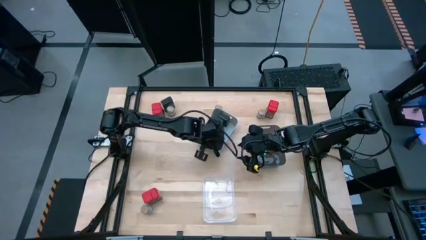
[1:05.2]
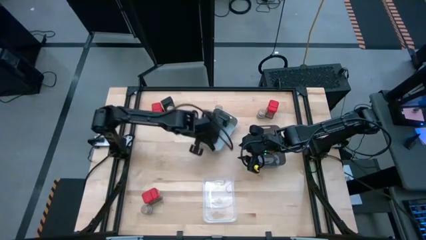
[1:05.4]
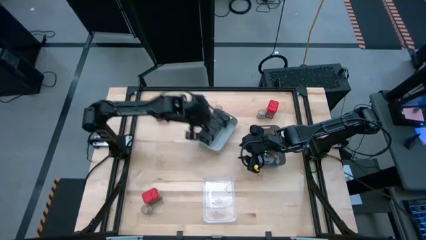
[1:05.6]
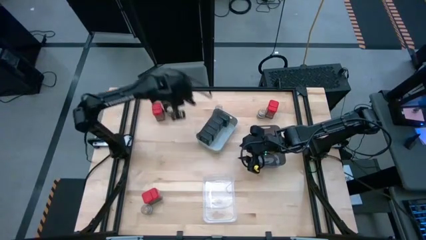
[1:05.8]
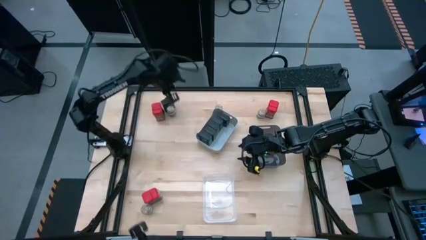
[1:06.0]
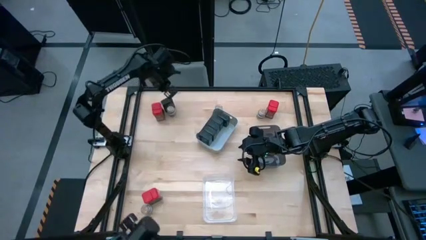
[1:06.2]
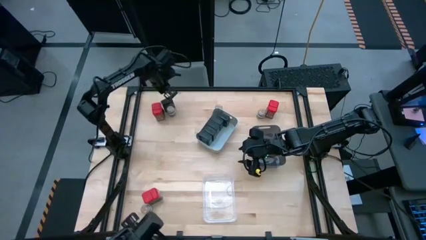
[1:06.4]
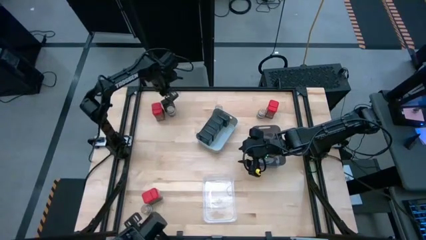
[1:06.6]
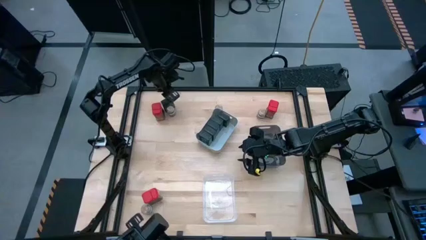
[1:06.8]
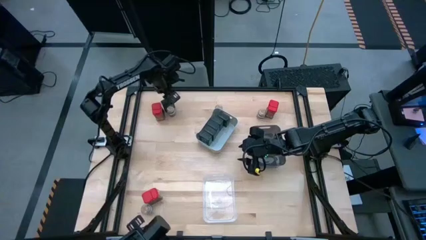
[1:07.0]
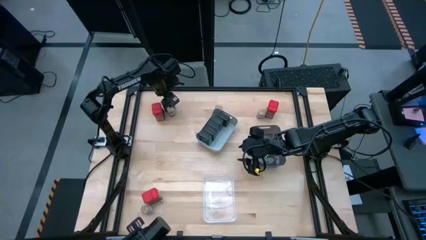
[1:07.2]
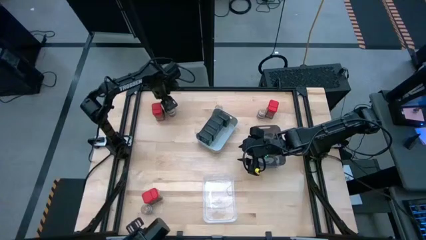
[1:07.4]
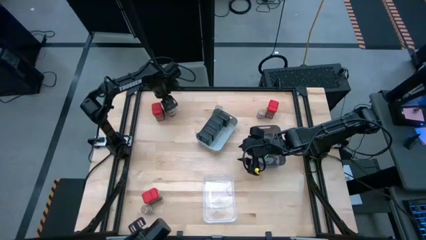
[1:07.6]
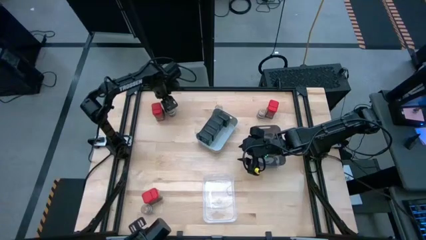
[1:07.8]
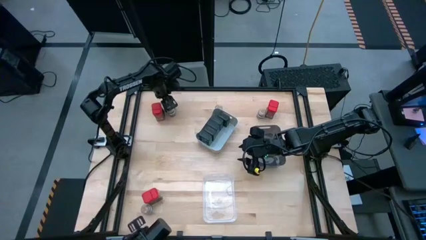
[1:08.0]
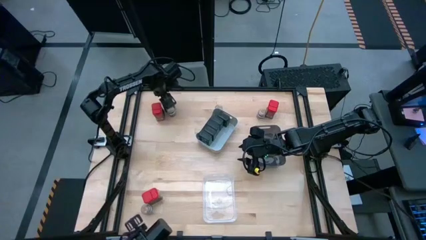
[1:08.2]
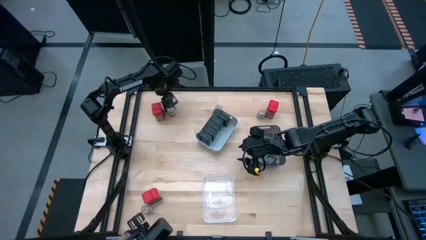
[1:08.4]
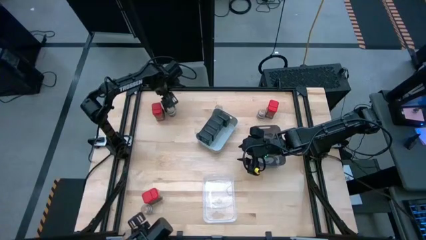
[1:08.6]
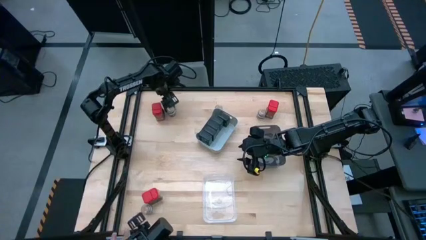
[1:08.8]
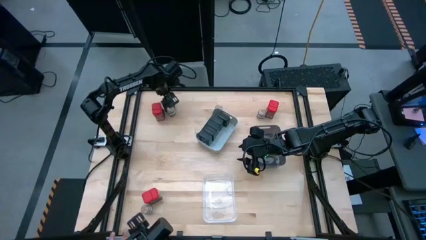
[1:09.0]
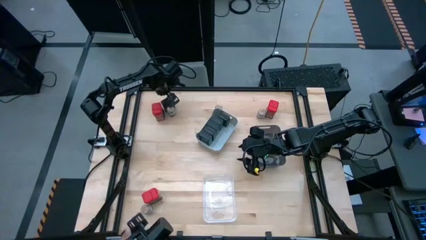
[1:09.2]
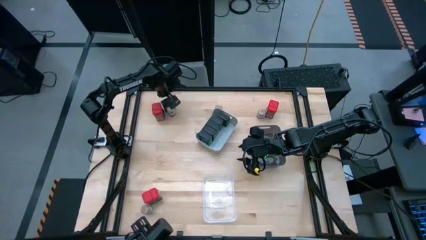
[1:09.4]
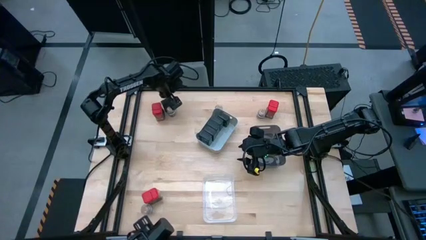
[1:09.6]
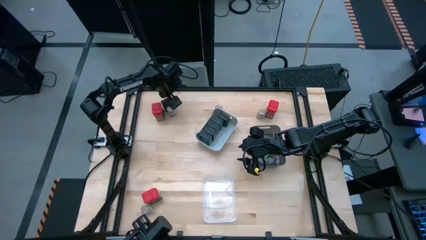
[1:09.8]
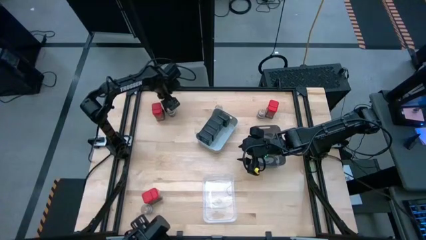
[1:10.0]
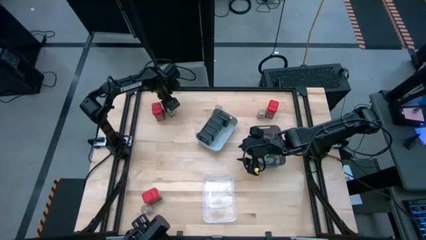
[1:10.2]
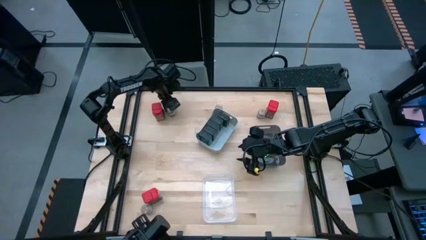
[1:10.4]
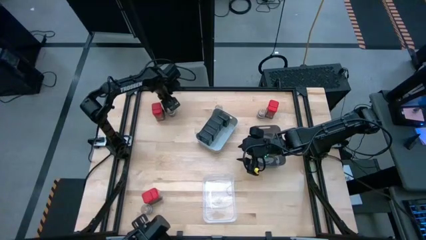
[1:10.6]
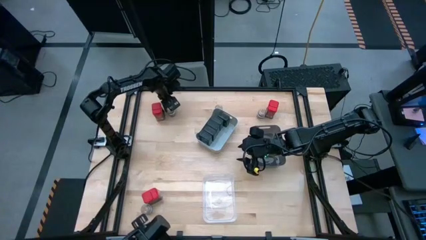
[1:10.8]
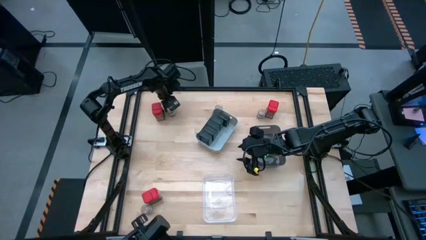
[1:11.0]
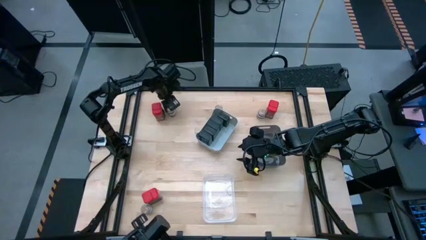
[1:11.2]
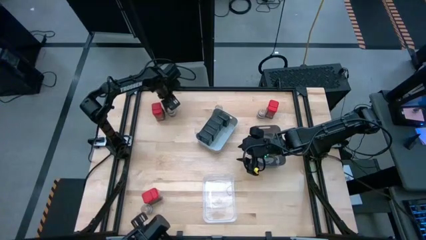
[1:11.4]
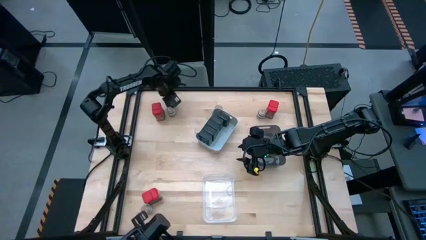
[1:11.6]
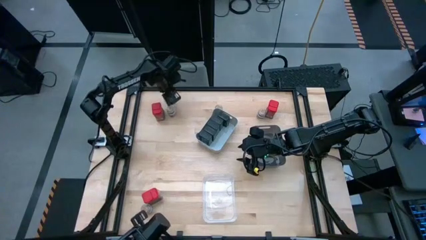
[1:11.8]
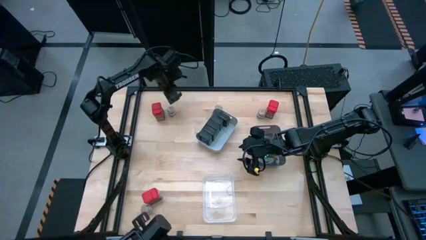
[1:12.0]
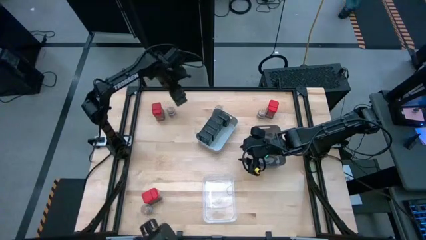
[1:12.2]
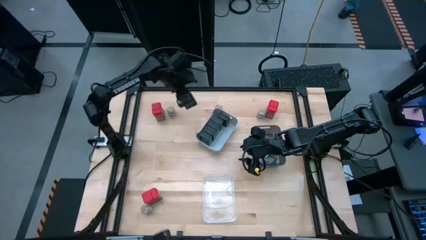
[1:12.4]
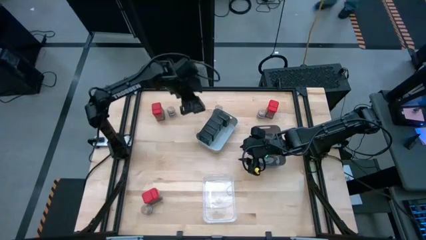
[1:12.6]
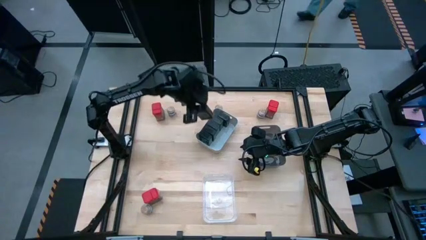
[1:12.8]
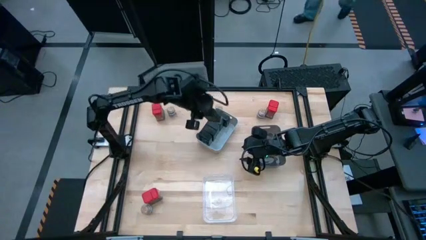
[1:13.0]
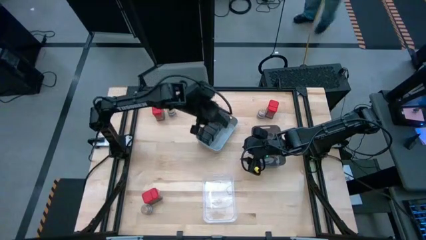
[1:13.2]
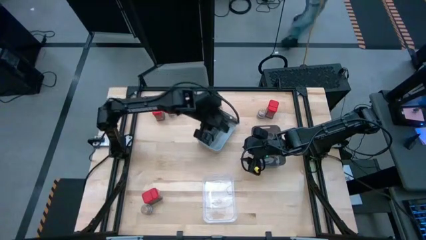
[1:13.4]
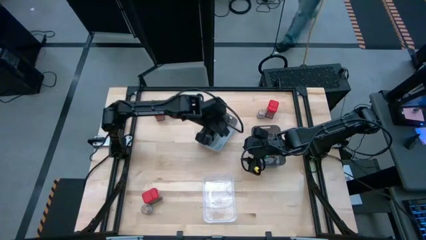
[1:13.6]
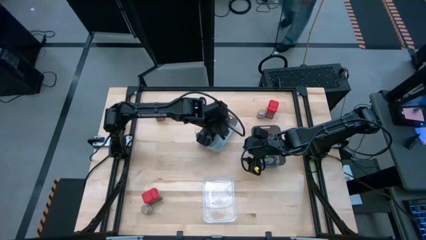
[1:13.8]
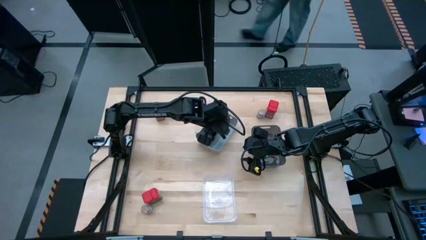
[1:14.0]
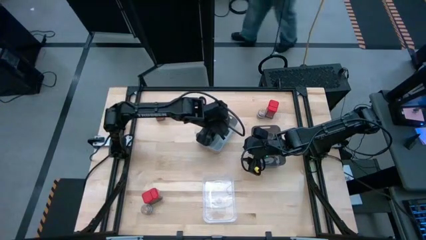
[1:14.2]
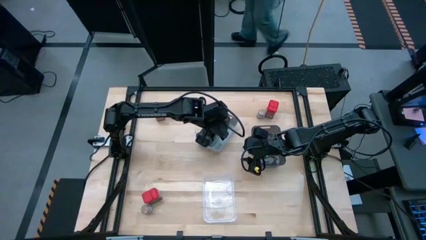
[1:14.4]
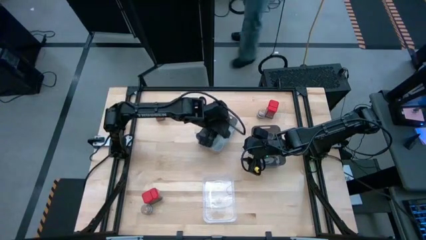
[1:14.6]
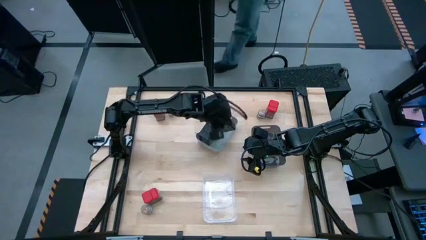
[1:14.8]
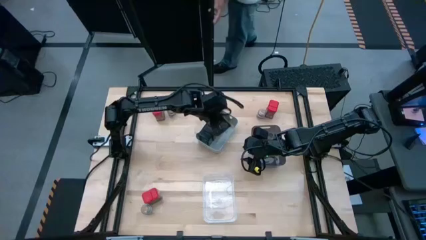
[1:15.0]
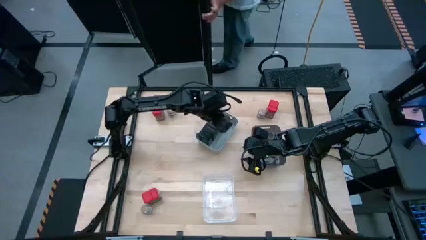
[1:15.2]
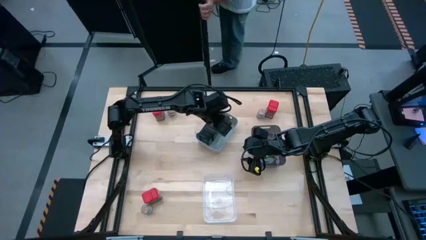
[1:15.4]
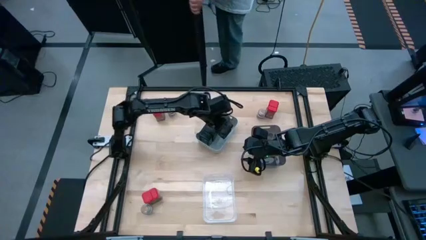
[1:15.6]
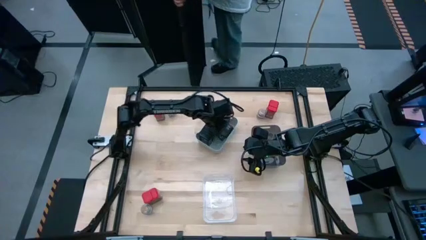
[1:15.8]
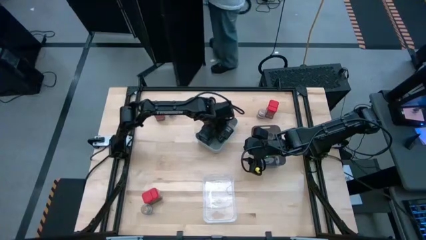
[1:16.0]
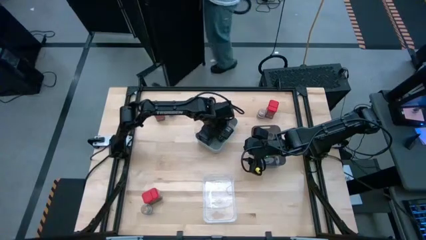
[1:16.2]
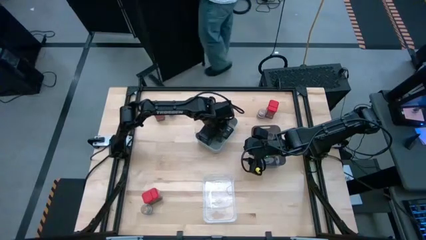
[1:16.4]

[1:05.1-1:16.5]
Task: Sort spices by type
Put the black spice can into the gray bin

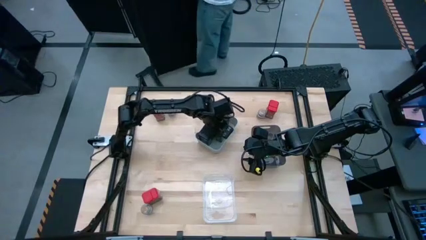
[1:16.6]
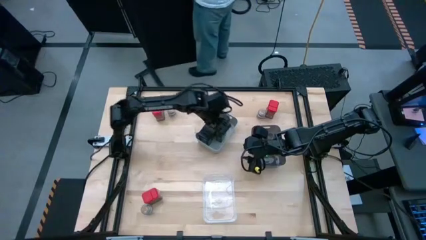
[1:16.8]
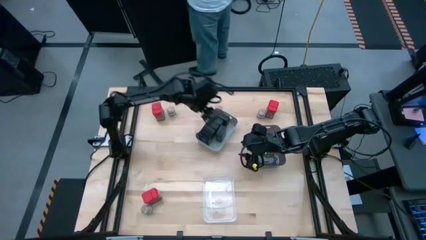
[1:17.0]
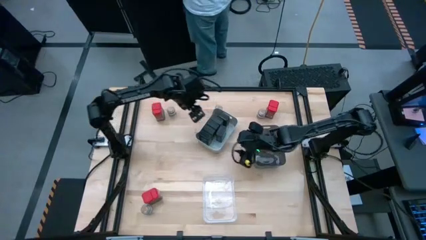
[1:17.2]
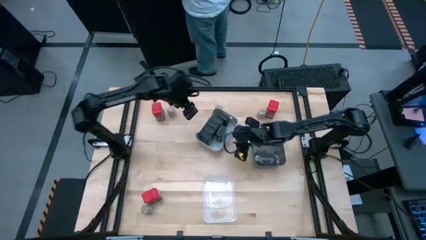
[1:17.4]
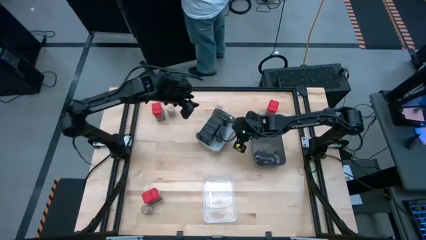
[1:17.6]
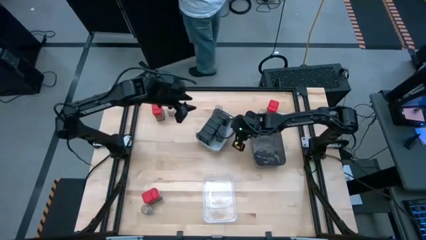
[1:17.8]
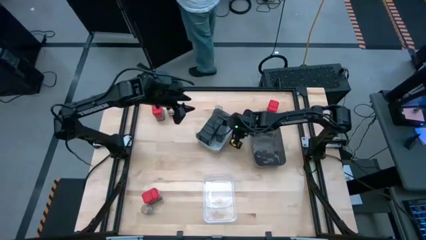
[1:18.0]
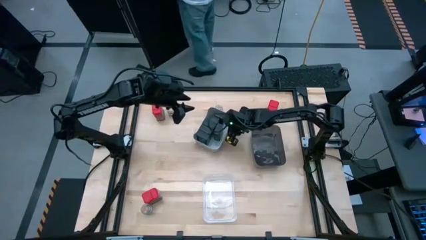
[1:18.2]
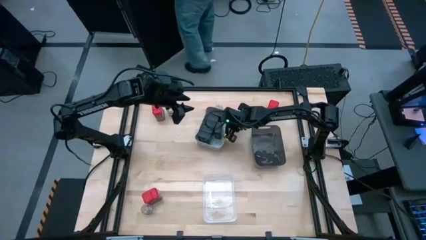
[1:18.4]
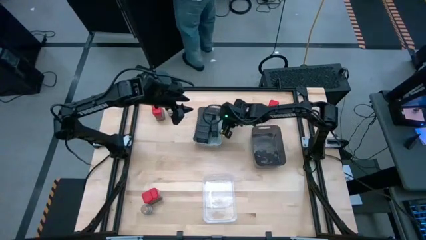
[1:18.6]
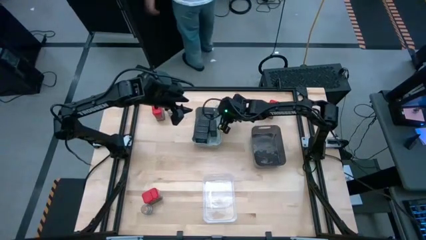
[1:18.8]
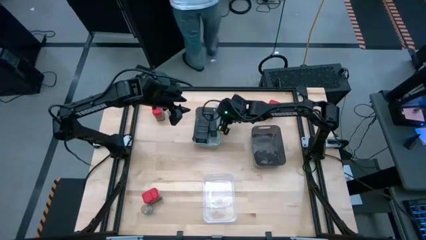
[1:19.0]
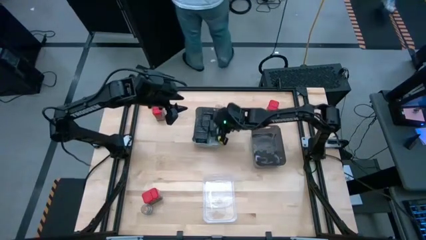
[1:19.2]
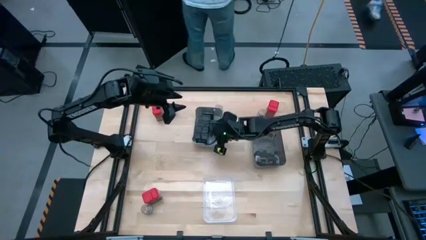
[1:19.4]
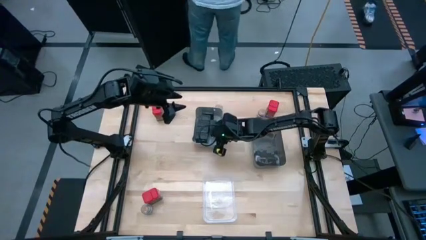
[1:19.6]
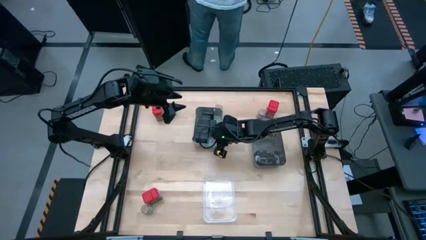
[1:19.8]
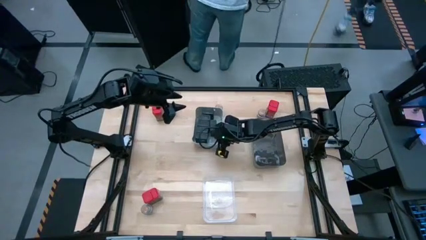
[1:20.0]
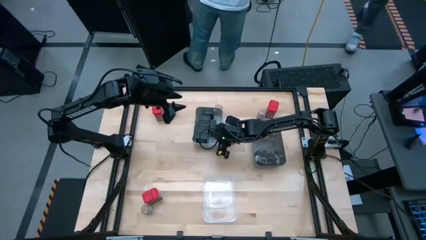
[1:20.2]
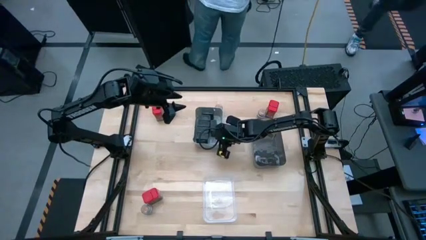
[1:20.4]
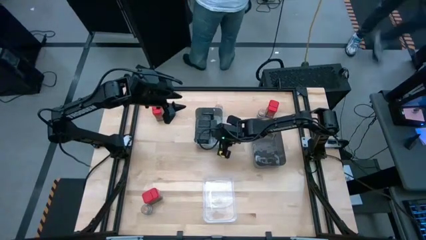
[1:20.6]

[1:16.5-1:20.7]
Adjust the gray bin

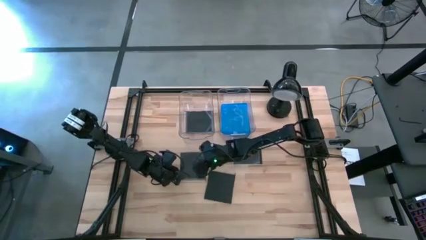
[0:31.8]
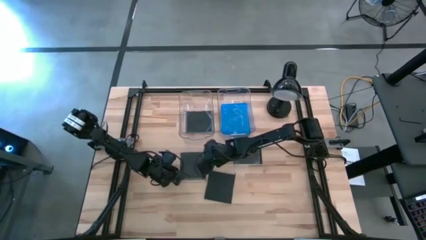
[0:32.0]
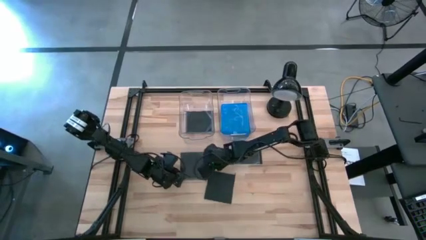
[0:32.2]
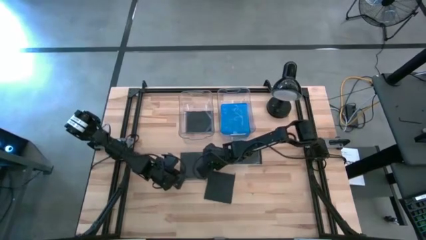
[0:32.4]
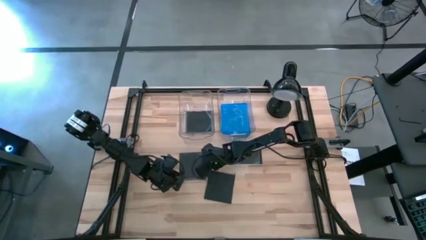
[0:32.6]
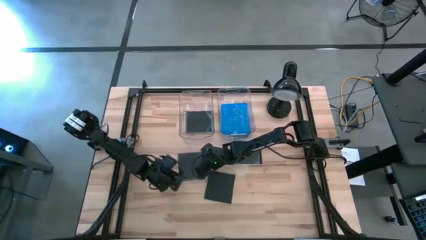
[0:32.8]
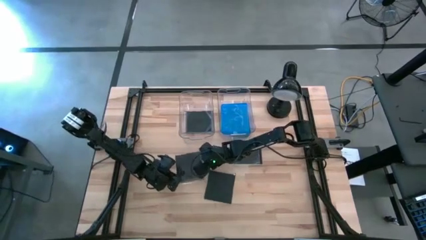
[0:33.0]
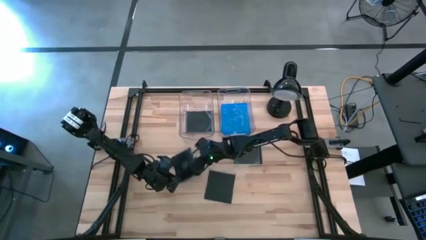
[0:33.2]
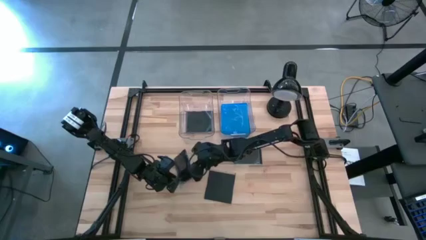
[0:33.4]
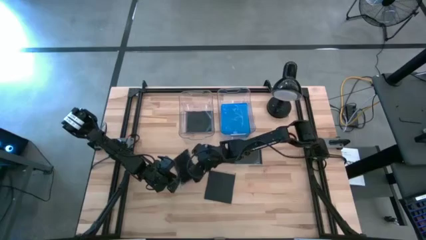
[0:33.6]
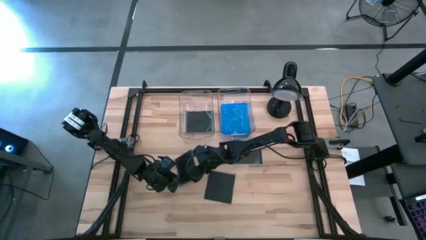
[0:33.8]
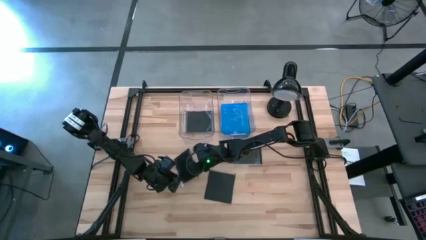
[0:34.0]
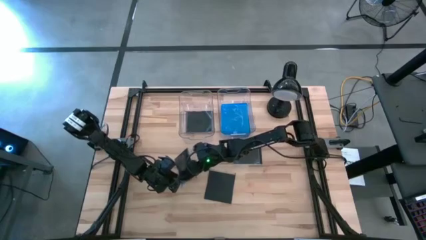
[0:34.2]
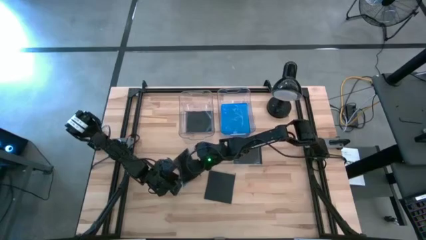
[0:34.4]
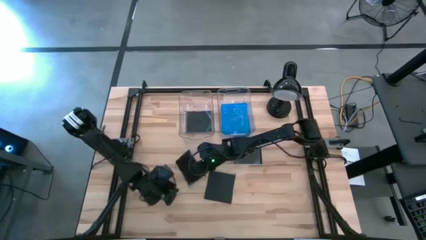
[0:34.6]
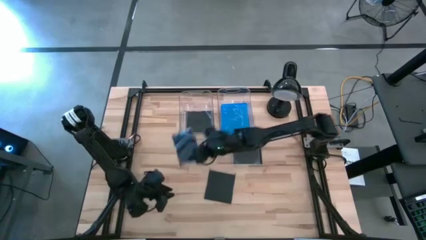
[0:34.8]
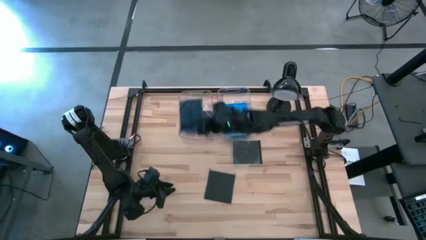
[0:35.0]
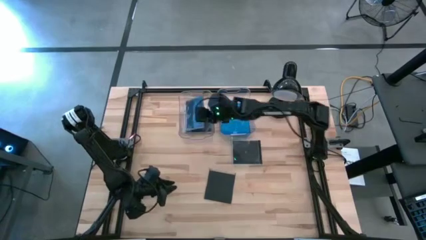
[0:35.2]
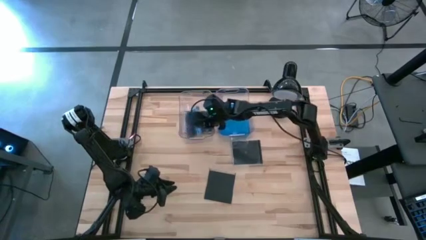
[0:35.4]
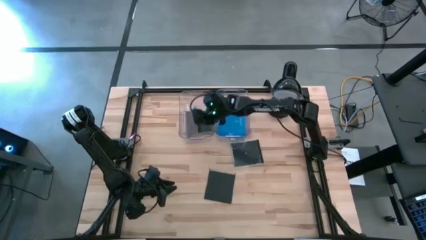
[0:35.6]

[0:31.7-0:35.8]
Task: Pick & place jewel cases by type
Put the top left black CD case into the left transparent bin
